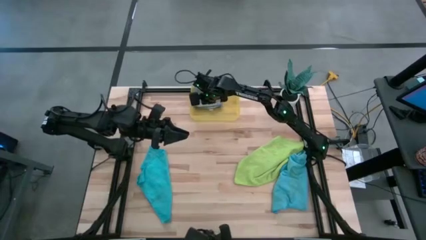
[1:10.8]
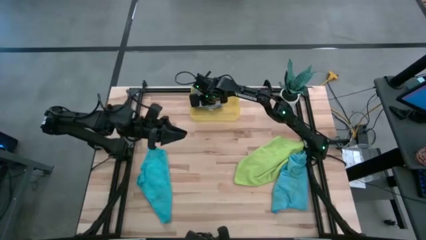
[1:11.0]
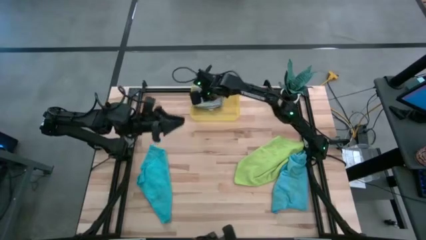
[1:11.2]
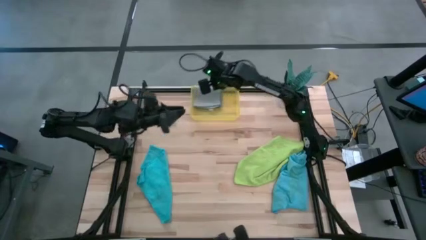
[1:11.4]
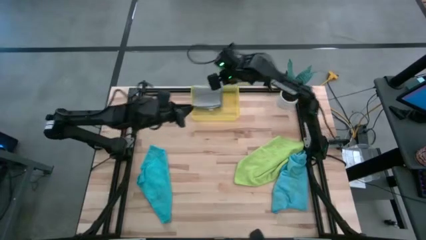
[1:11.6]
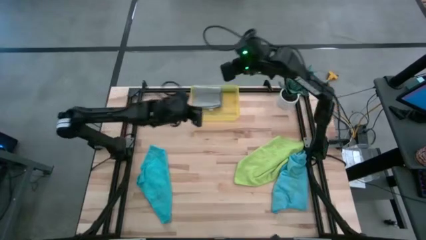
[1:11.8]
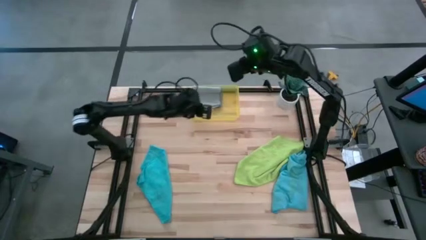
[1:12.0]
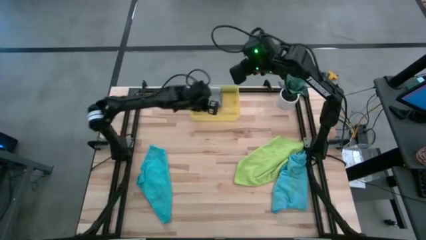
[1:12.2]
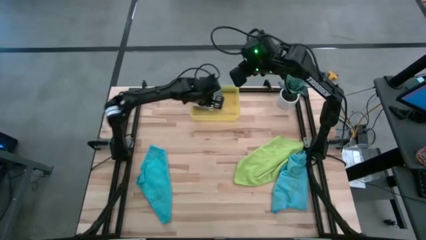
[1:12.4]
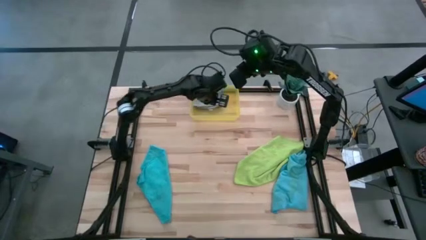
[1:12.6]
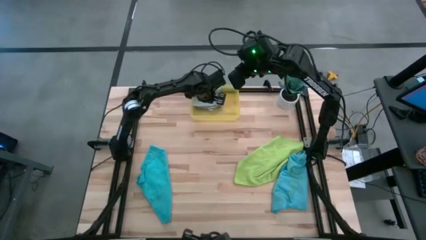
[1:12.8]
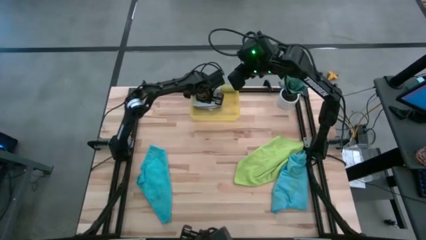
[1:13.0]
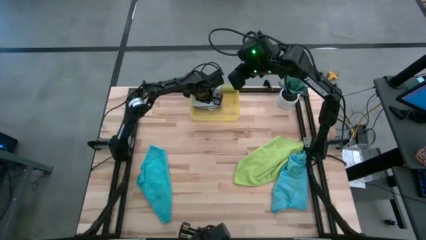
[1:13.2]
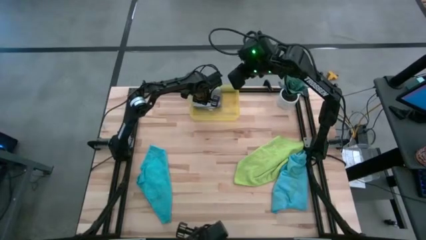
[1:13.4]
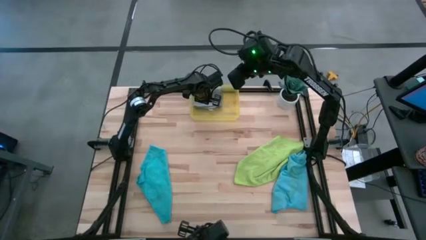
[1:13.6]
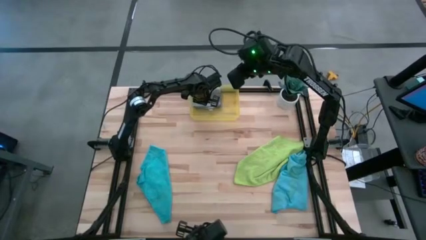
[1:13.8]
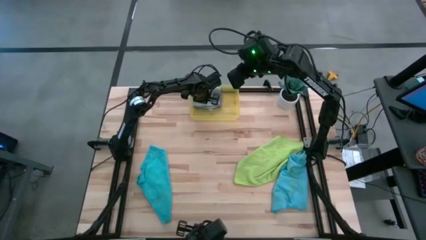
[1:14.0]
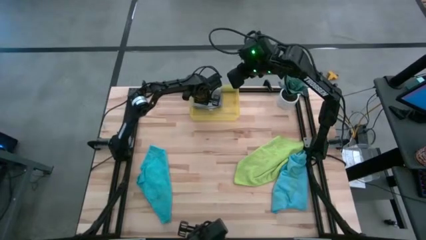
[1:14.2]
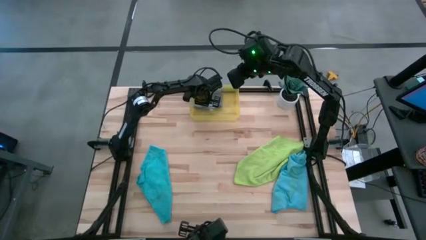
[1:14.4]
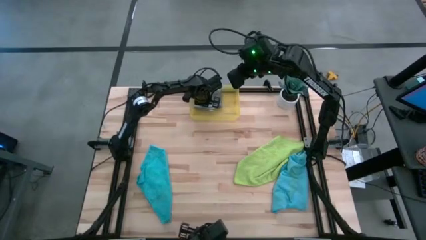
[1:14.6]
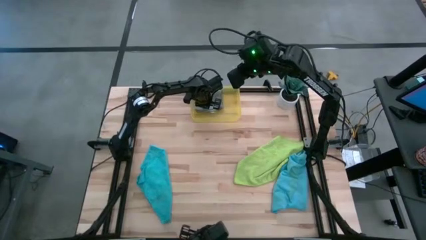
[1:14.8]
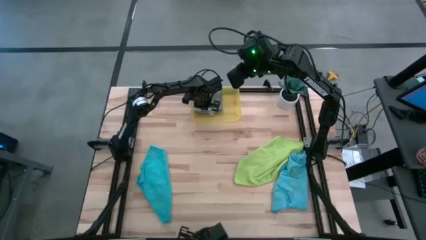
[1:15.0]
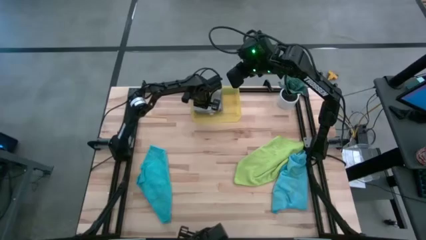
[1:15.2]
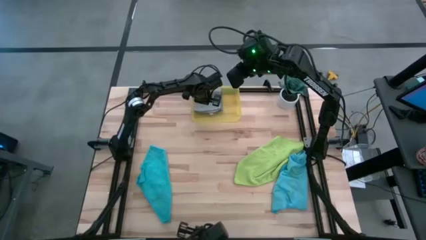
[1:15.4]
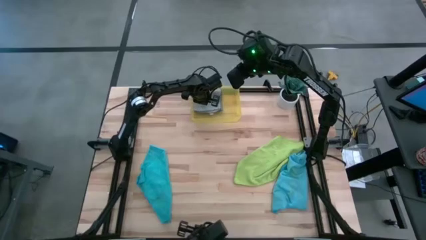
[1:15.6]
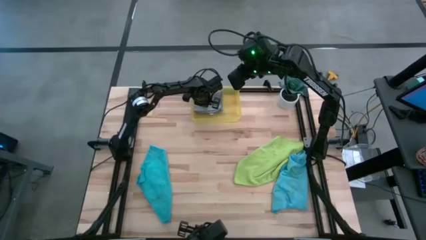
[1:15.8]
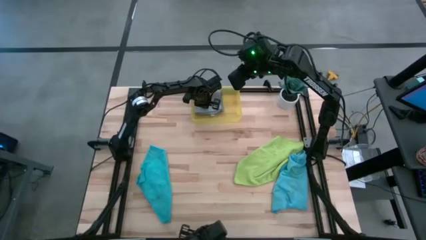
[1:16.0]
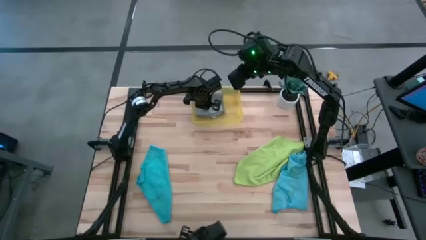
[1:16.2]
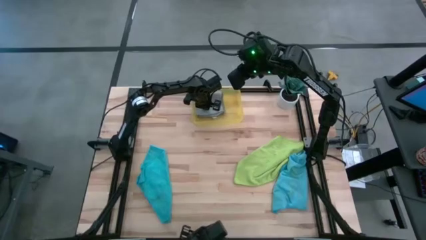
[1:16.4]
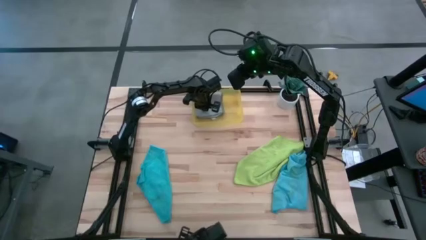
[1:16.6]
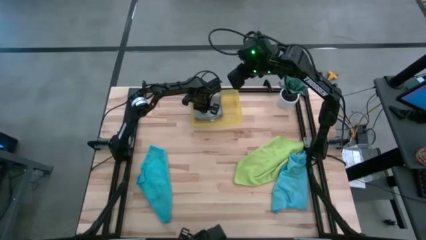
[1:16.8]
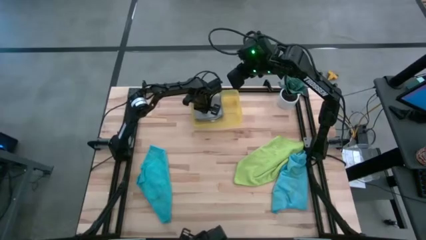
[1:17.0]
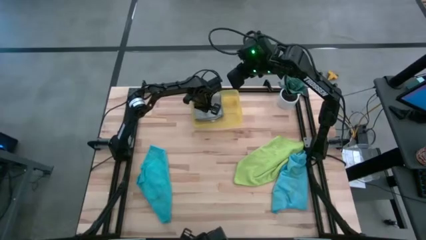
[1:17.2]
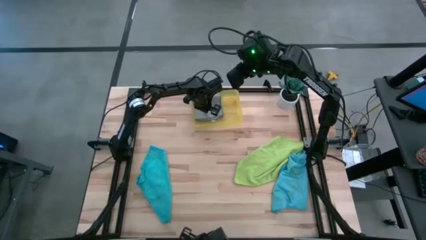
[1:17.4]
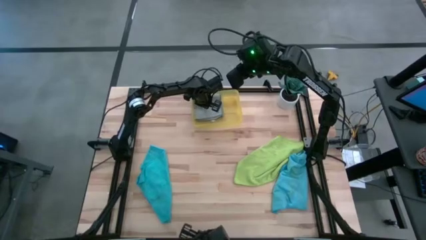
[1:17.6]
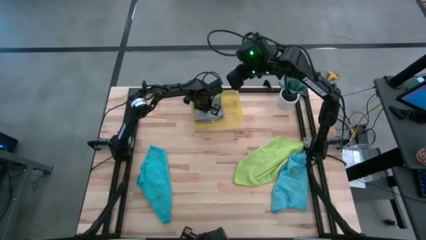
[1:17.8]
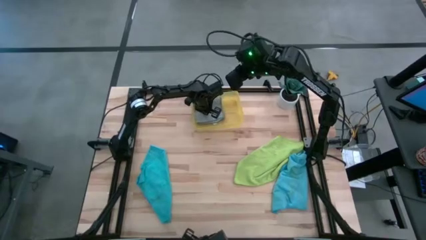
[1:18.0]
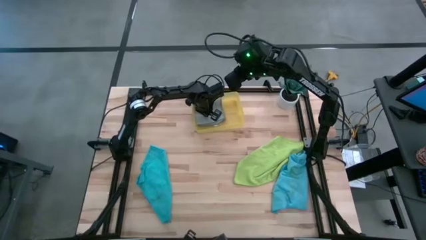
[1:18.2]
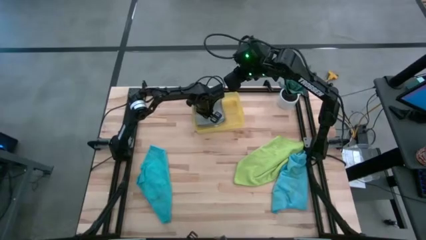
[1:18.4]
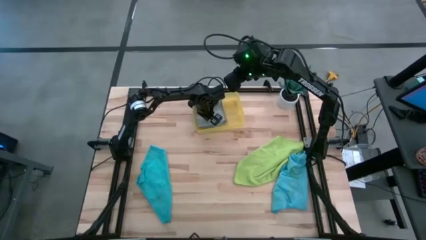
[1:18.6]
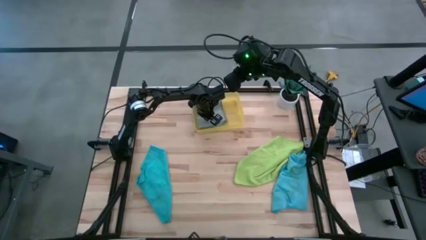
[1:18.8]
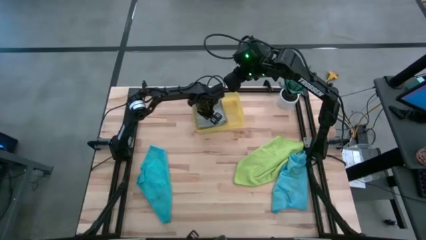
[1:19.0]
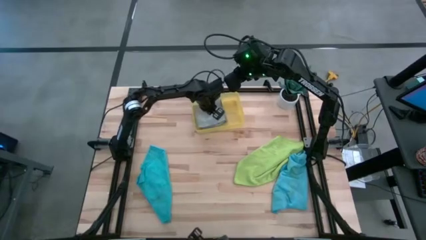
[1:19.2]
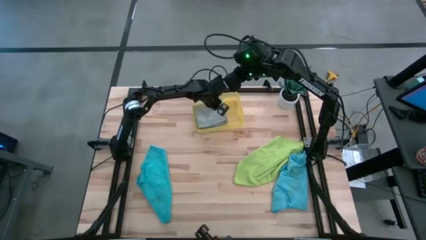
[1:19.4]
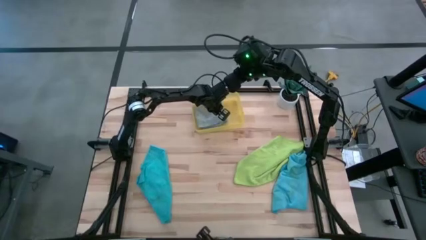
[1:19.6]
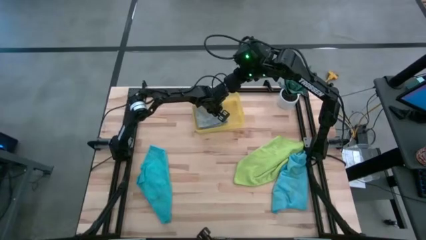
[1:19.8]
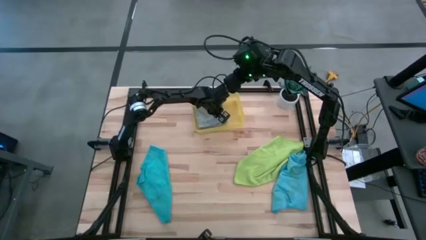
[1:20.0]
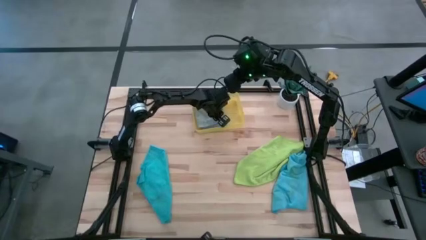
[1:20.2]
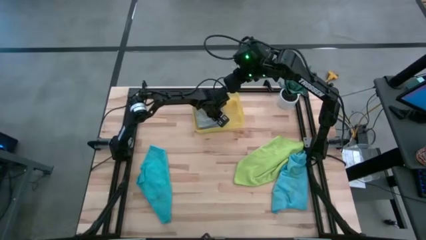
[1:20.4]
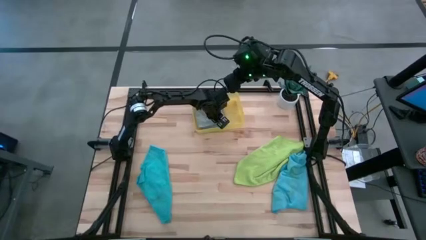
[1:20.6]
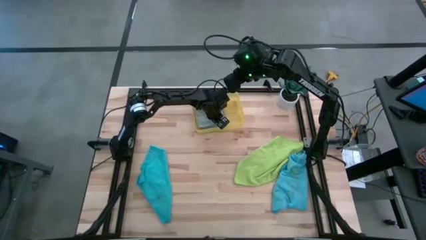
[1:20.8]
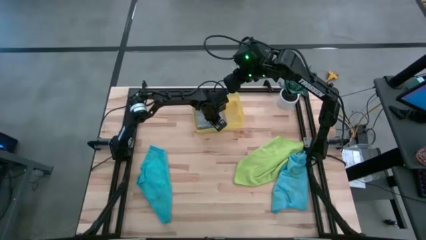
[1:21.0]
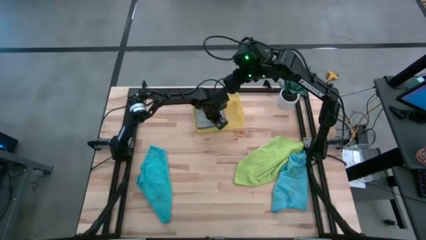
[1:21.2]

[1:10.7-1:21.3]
Task: Fold microfiber towels
Put the gray microfiber cloth into the bin

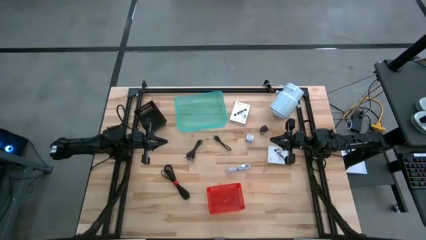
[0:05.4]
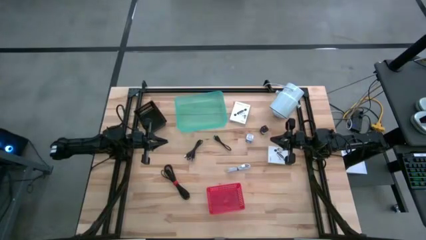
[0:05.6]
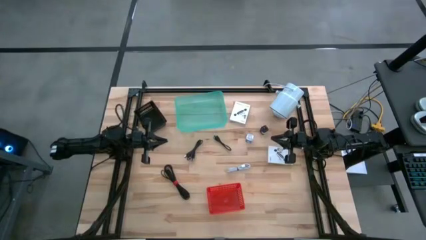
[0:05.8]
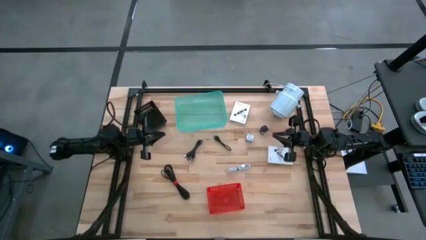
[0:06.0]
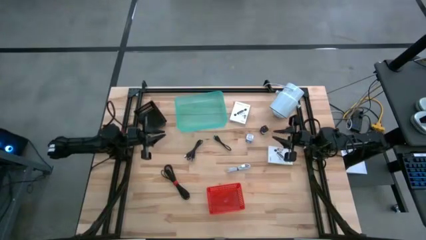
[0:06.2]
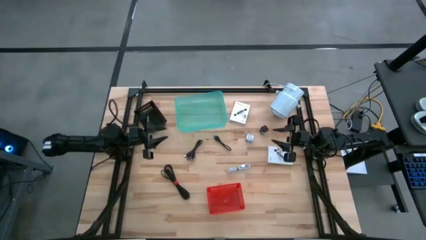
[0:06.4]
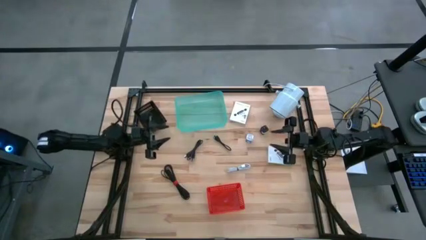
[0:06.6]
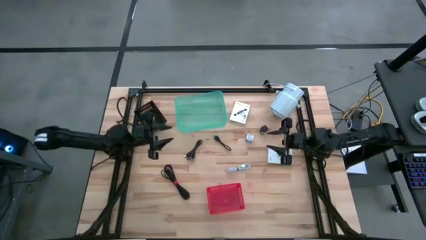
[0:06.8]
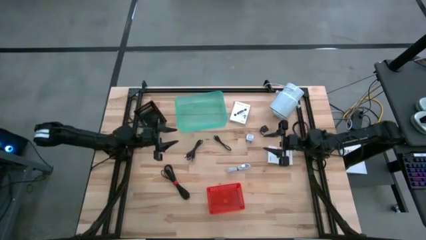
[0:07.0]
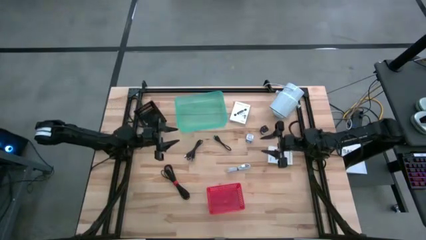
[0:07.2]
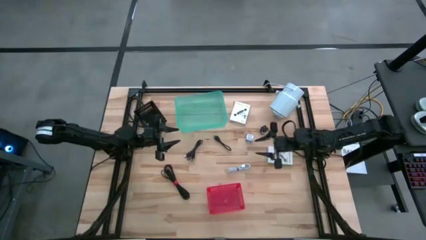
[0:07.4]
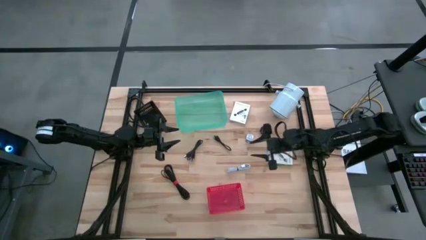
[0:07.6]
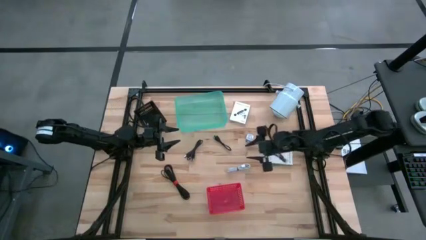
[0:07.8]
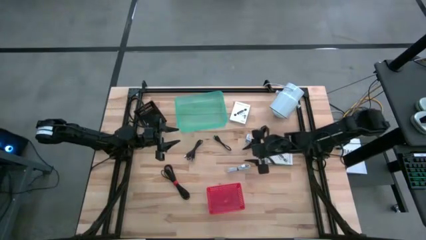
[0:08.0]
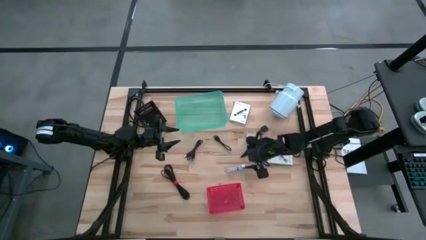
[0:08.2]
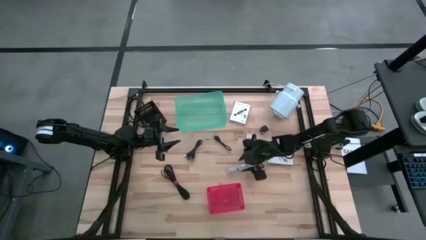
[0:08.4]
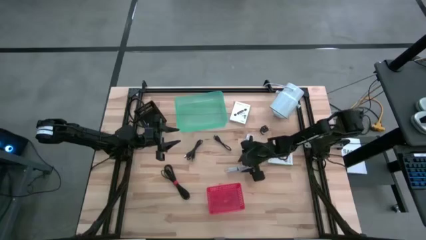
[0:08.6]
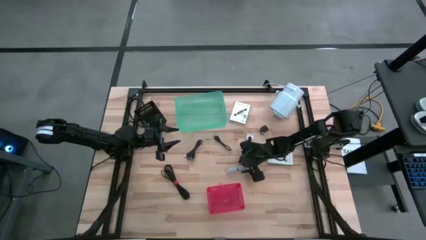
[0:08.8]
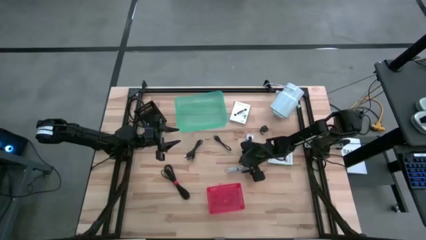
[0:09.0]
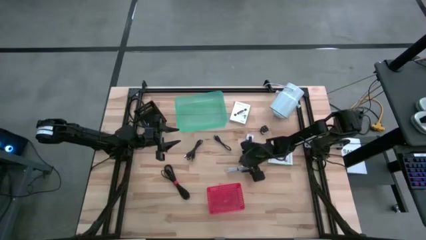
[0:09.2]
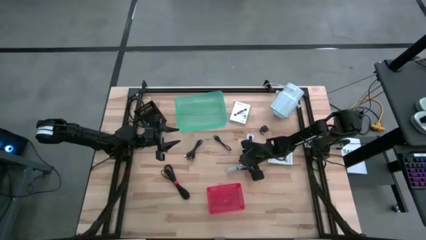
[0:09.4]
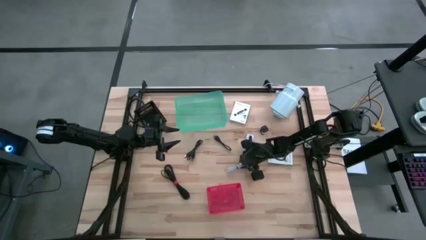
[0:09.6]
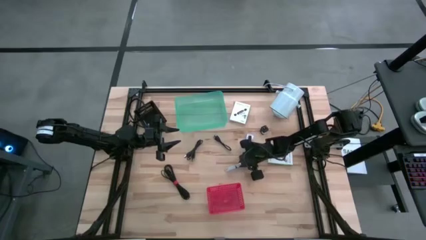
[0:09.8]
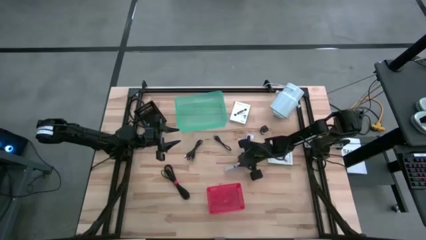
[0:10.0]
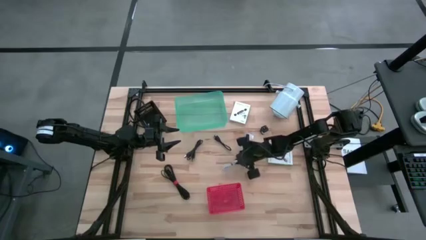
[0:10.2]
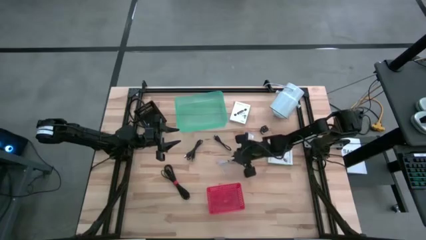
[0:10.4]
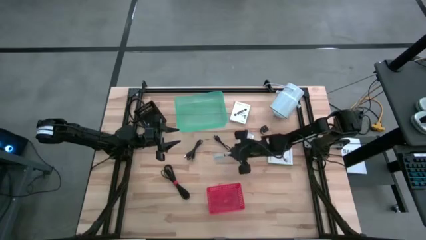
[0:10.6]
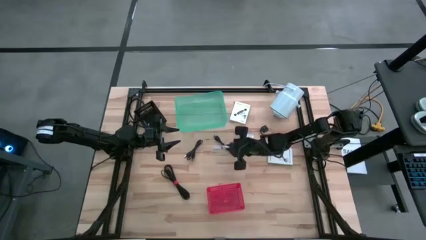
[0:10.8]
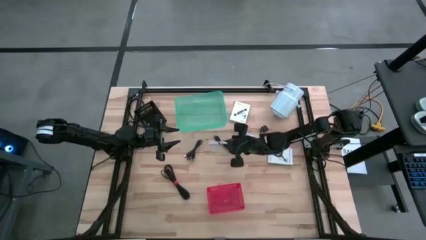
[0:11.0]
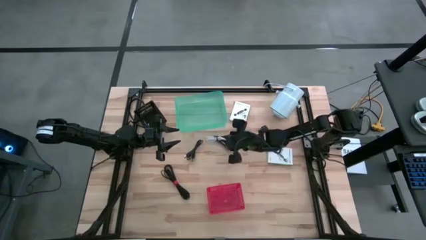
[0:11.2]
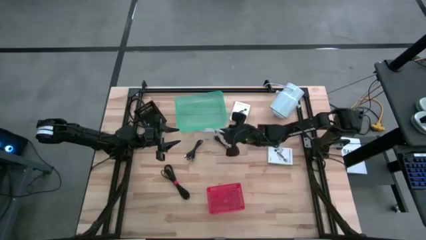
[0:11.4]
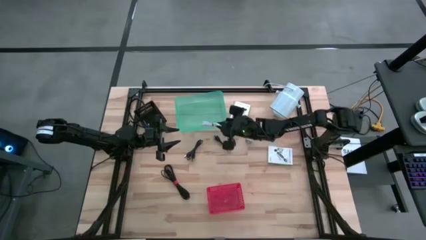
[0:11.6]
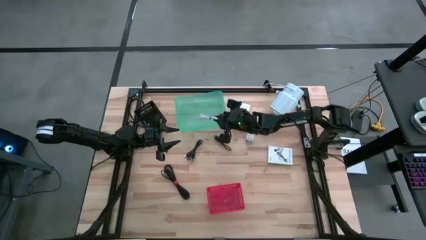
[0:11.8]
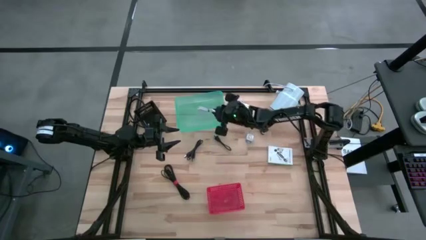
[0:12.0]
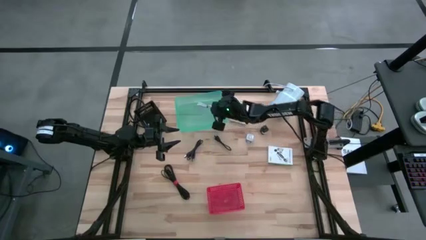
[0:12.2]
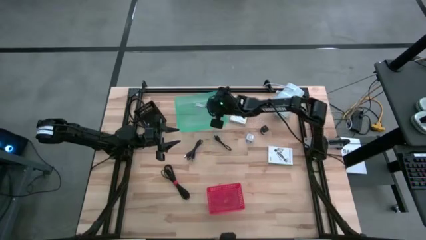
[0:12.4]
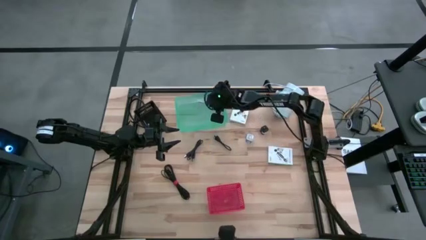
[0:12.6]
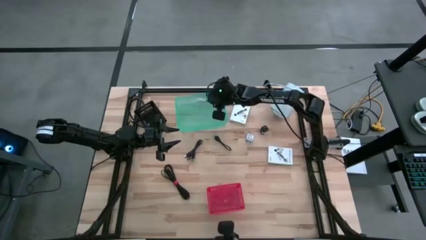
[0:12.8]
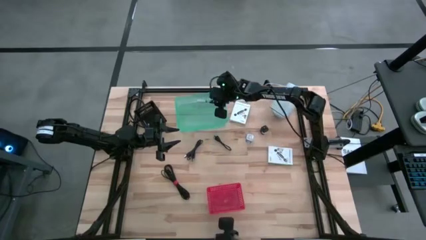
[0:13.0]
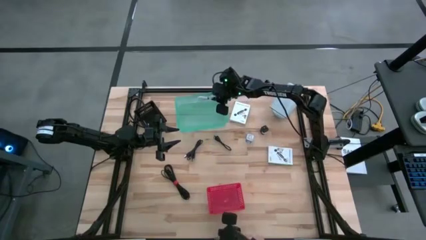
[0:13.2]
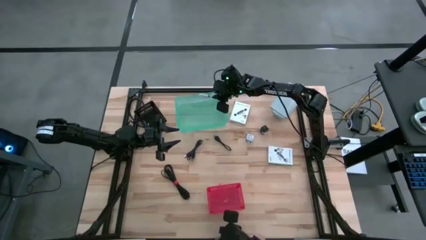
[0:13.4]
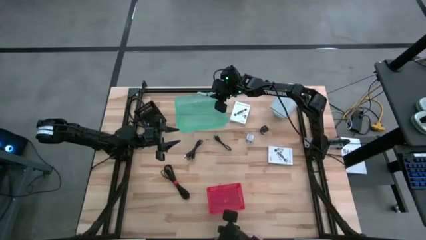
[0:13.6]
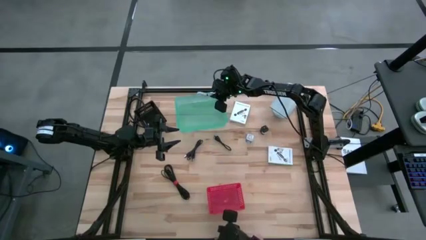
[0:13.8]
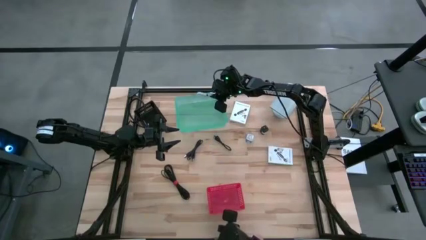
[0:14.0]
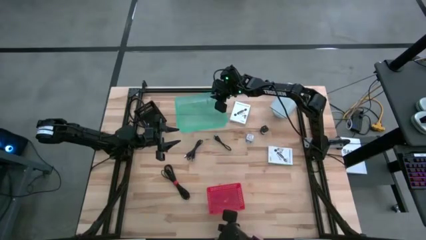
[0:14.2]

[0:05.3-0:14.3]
Task: Pick and place items into bin
Put the white charger cable into the green bin
